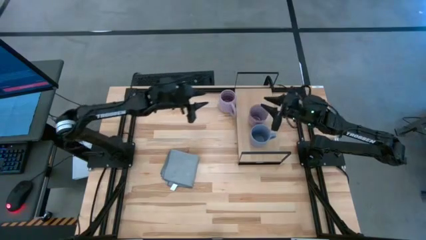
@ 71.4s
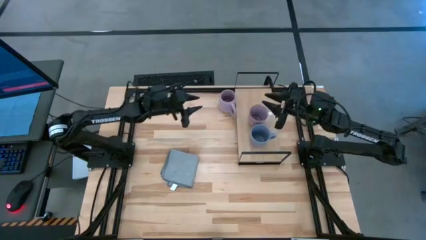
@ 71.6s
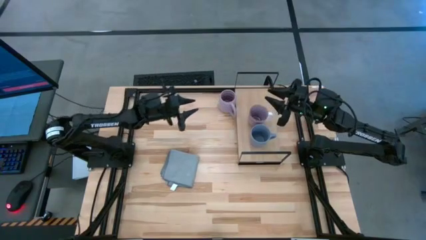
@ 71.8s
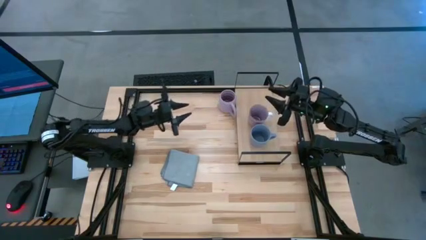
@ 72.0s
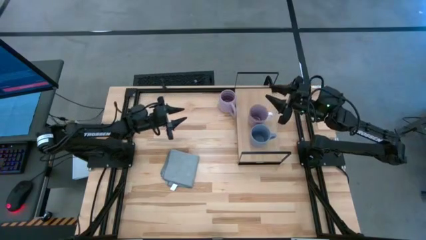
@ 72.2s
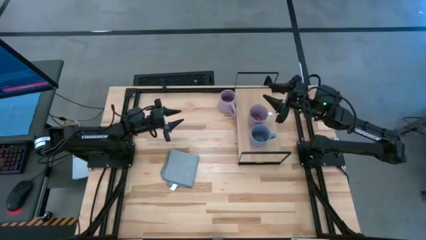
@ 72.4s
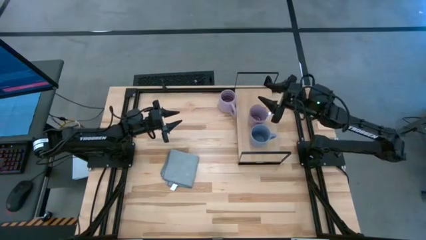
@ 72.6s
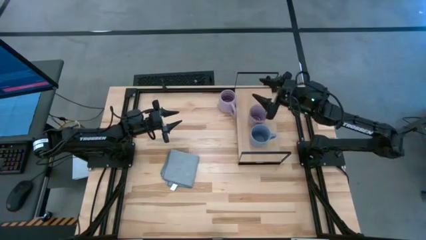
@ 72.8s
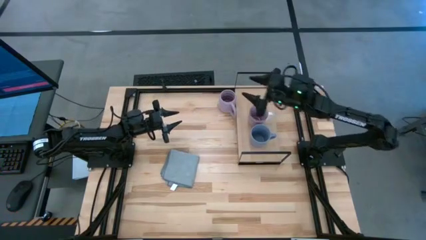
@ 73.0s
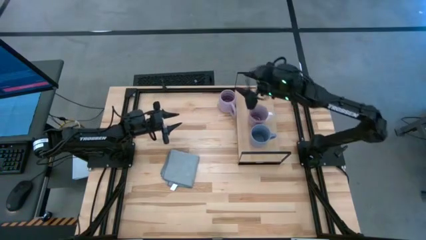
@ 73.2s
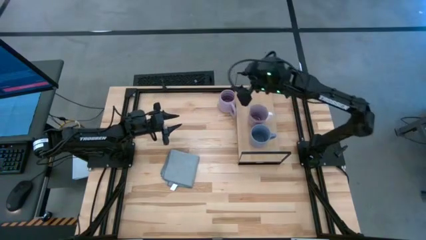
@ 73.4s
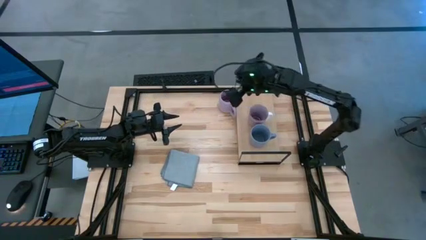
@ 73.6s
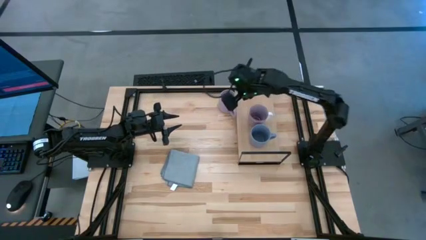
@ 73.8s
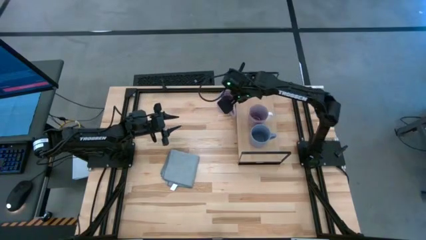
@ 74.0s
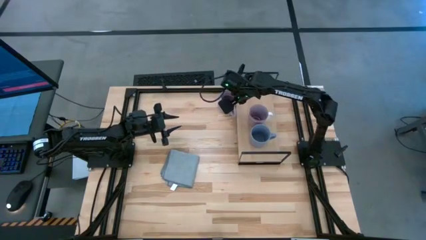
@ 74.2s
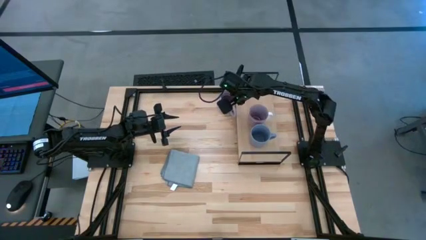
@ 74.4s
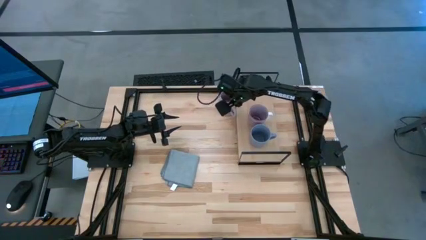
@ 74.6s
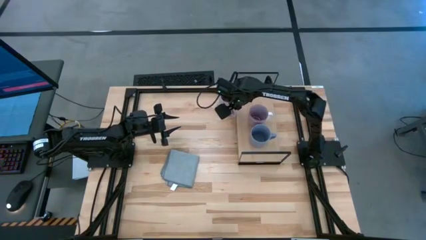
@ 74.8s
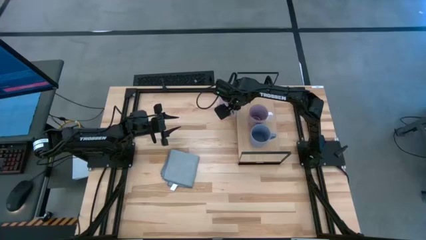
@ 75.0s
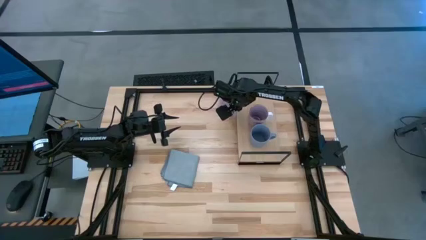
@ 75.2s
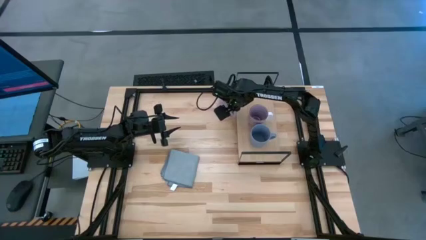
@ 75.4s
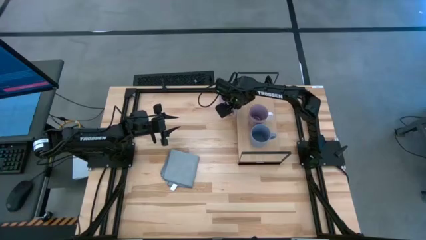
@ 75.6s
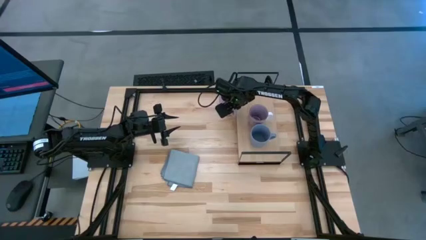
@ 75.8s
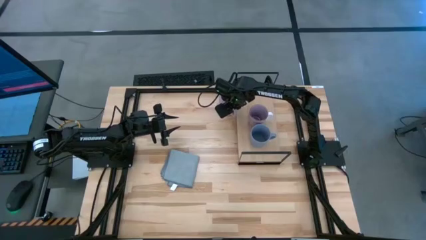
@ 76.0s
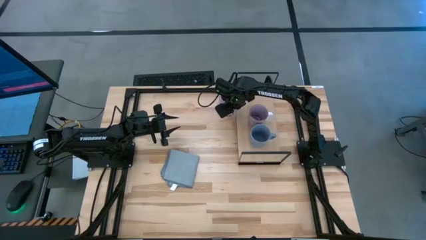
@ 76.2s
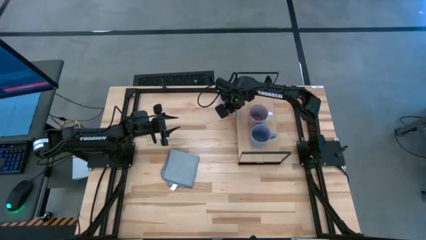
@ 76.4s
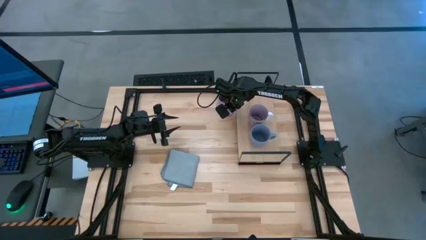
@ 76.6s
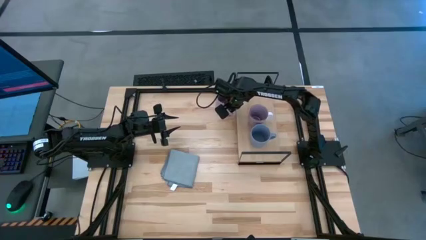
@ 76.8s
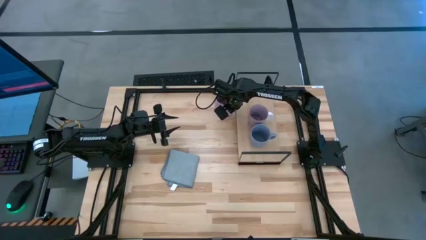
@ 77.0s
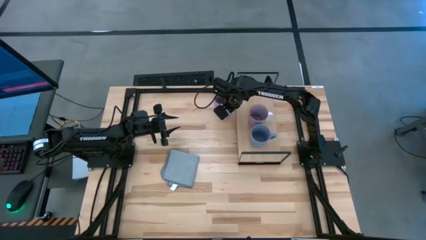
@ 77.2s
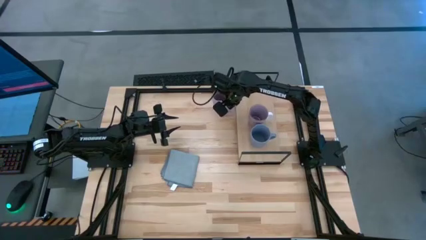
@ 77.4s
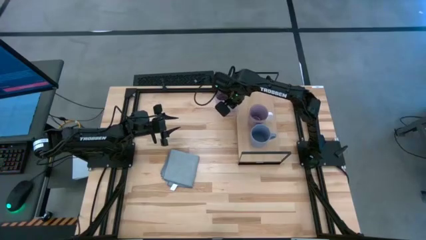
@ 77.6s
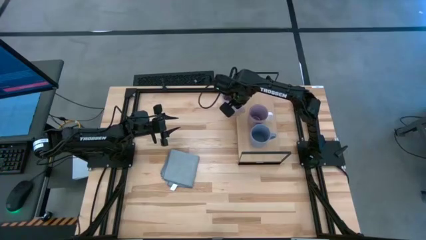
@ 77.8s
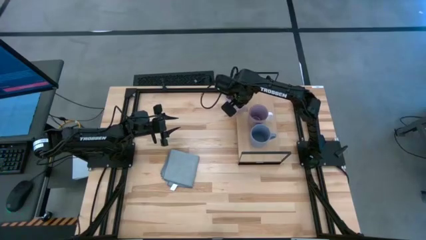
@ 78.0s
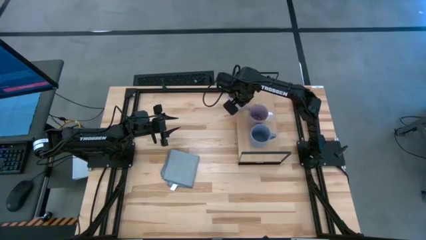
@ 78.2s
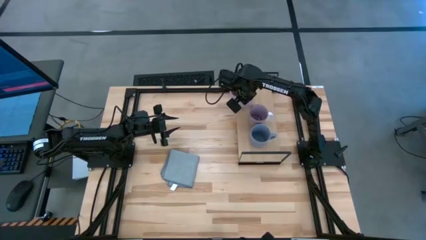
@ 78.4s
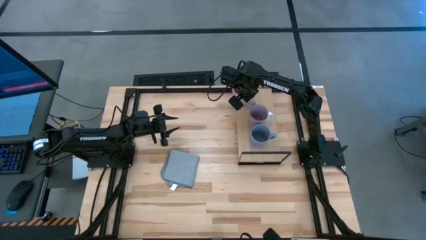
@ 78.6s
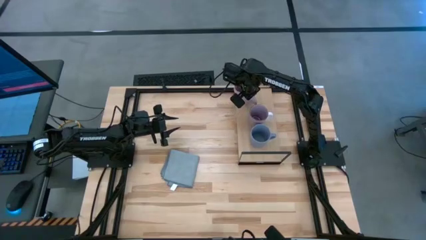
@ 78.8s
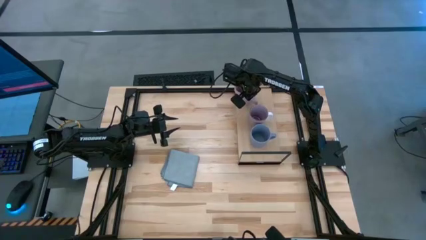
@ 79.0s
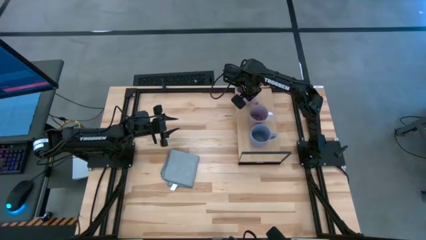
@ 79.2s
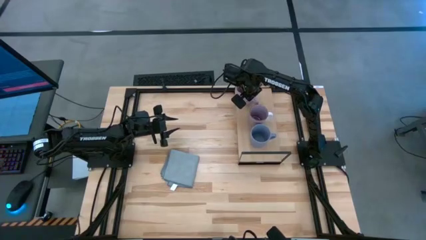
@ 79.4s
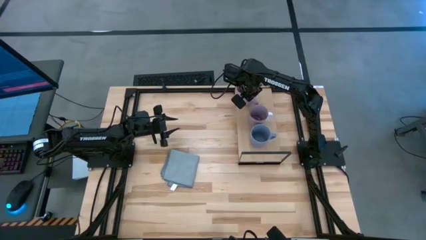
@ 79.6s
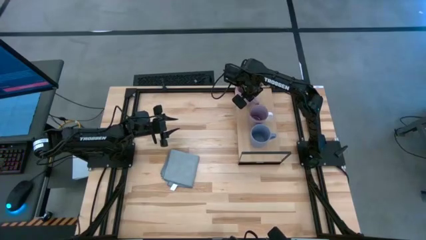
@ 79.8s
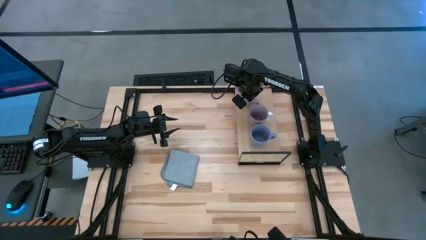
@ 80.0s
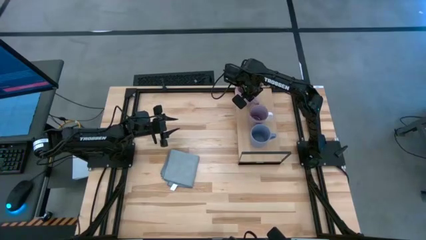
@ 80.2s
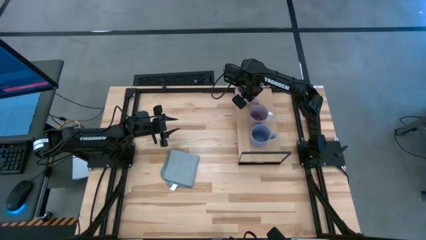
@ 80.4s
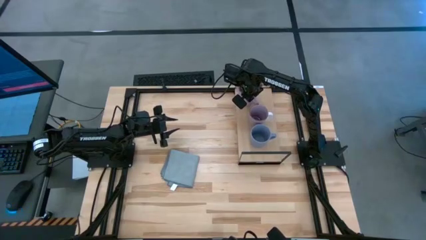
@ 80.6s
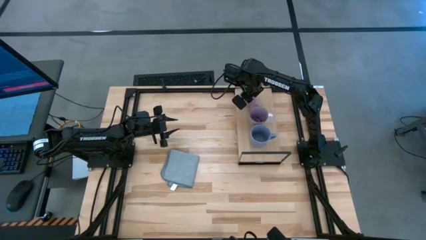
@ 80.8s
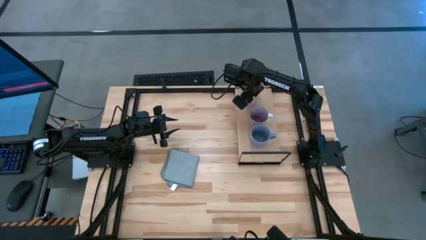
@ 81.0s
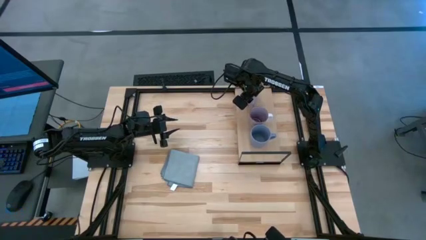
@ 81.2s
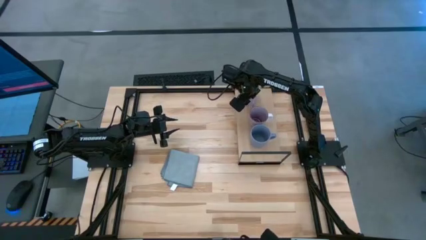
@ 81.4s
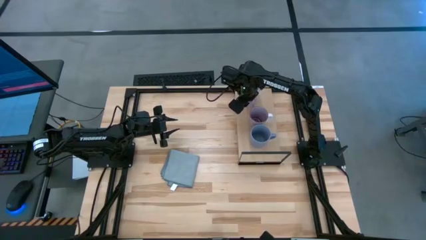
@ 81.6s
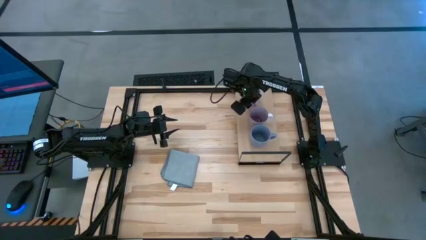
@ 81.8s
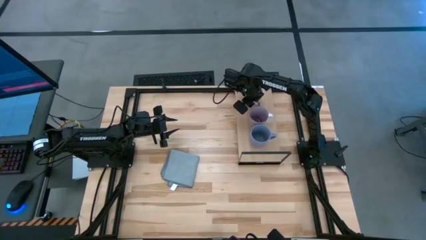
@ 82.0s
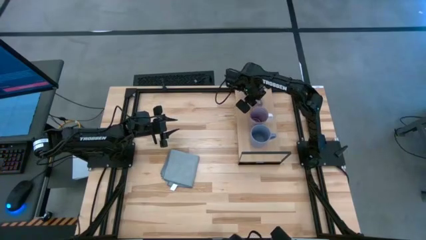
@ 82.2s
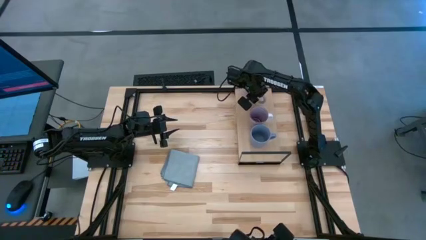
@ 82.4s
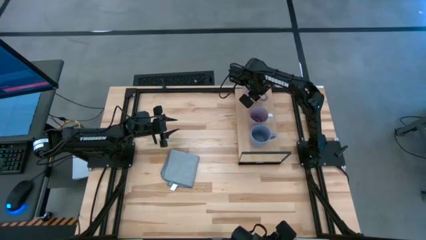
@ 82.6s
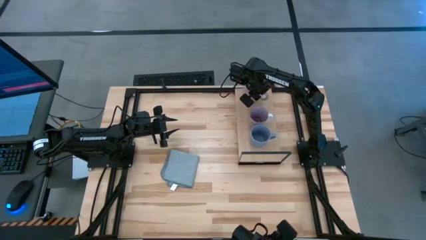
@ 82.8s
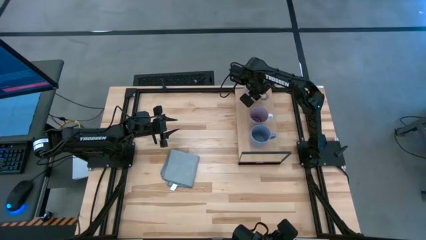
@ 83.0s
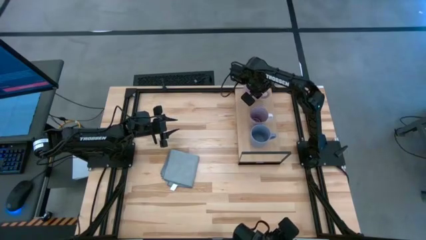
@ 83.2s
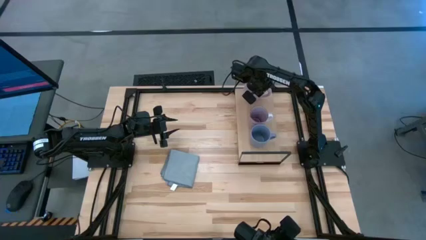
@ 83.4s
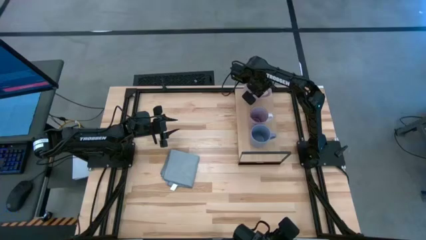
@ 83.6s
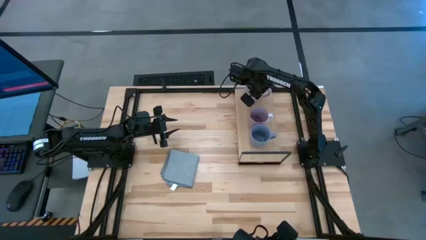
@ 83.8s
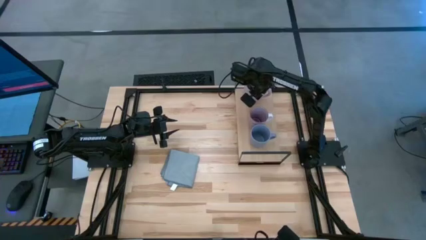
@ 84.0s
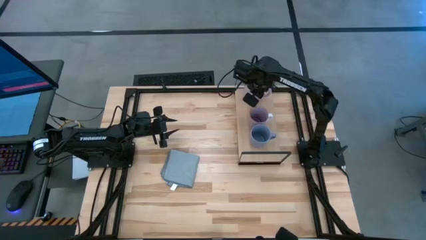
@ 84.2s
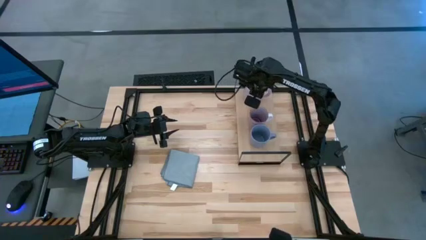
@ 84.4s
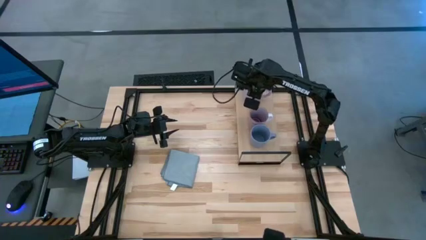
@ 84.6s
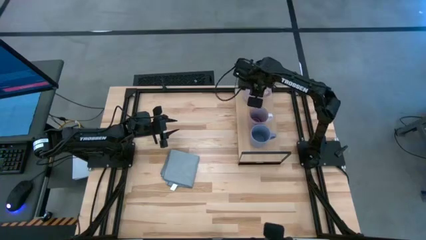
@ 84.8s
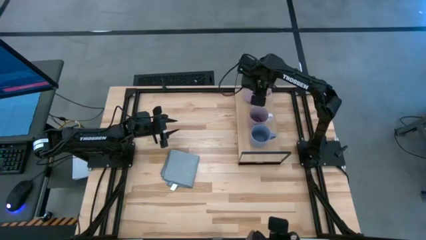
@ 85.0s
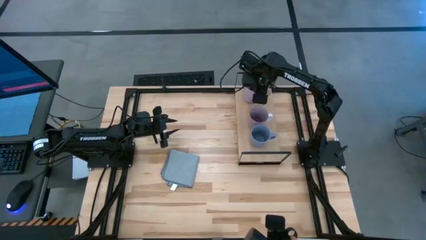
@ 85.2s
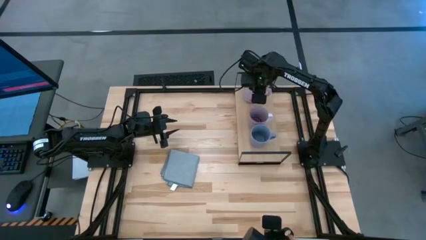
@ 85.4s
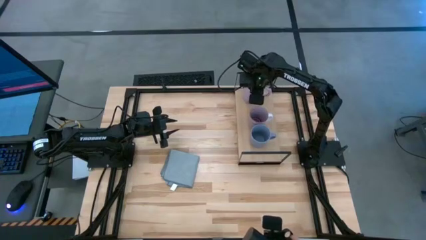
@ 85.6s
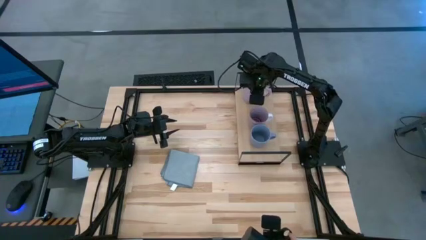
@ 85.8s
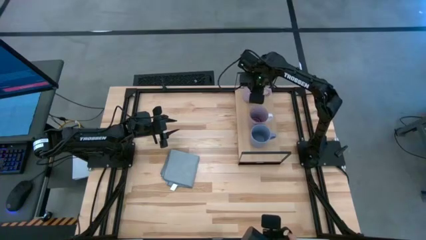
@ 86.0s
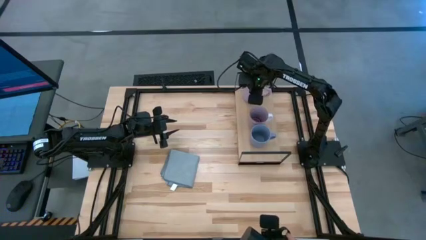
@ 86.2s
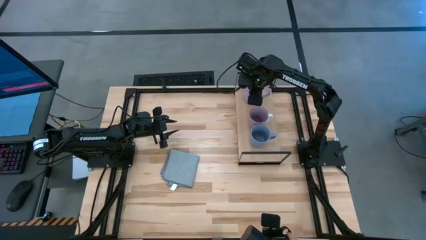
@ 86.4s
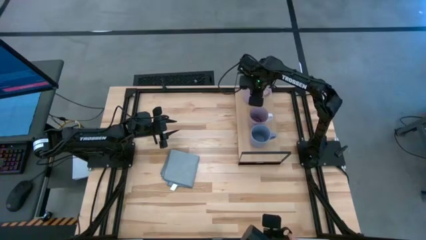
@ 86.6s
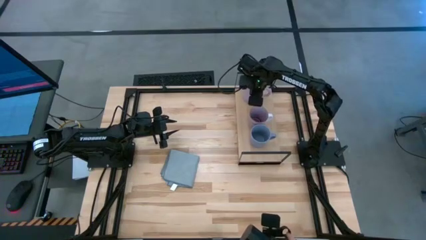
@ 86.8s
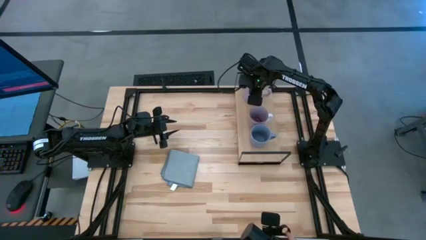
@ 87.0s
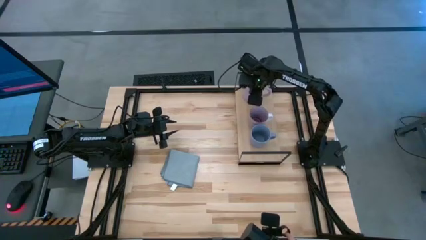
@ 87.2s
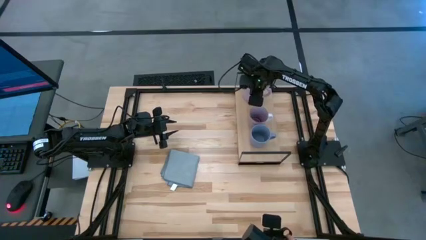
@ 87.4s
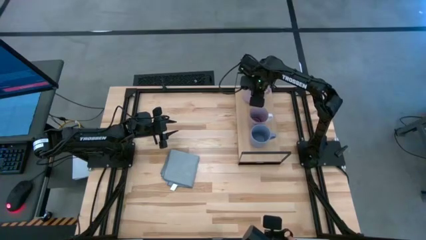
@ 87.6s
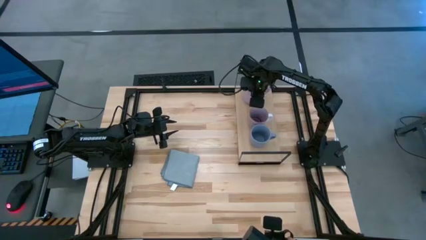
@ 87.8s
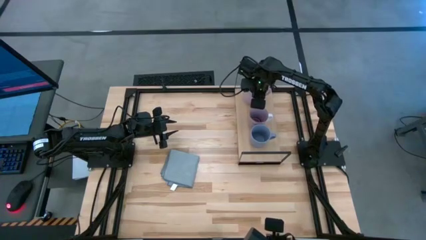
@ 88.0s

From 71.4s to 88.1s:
Task: Stack small to large cups/mugs on shelf
Put the purple mug on the shelf
